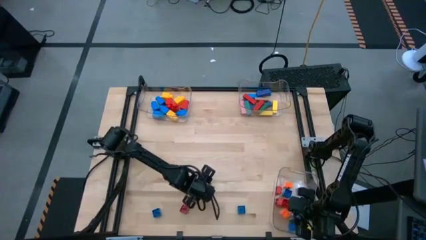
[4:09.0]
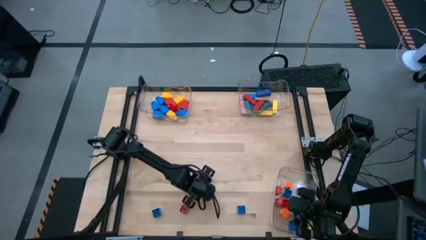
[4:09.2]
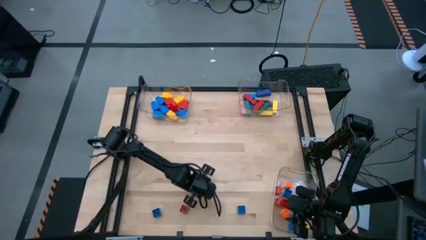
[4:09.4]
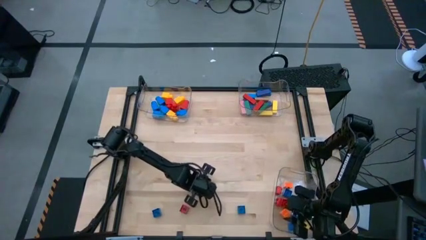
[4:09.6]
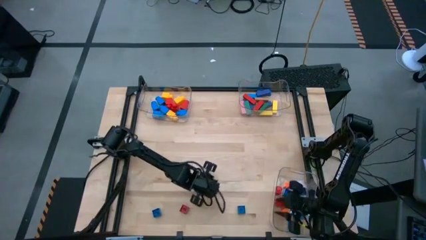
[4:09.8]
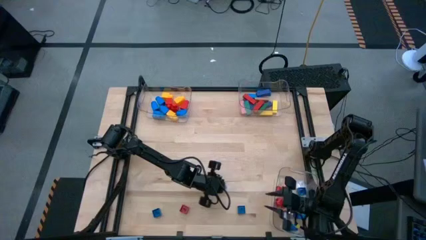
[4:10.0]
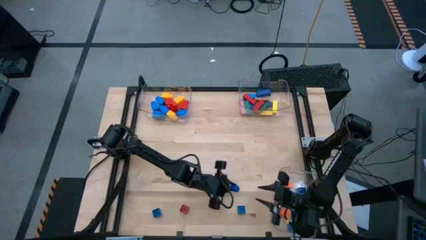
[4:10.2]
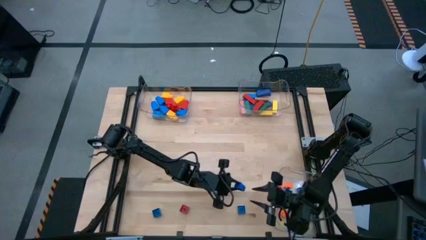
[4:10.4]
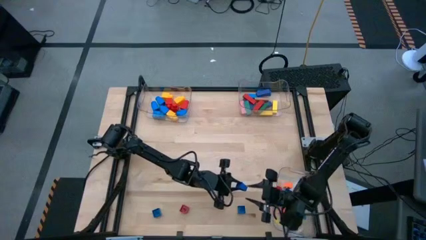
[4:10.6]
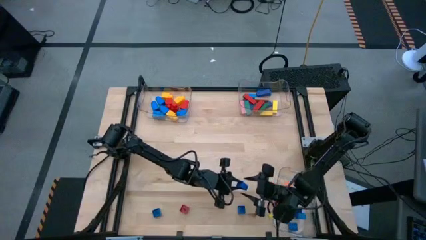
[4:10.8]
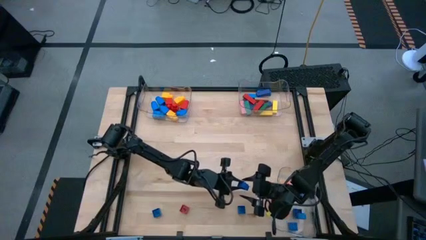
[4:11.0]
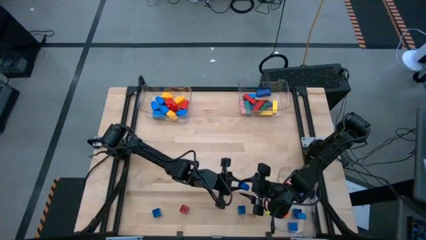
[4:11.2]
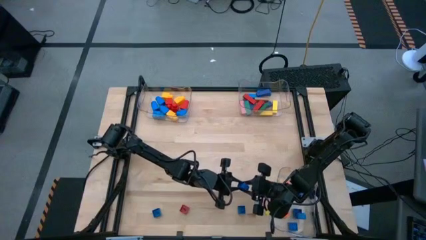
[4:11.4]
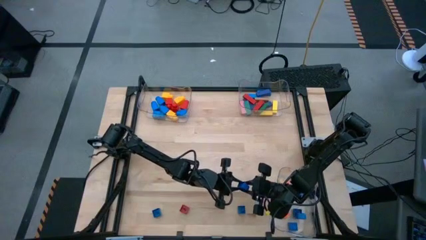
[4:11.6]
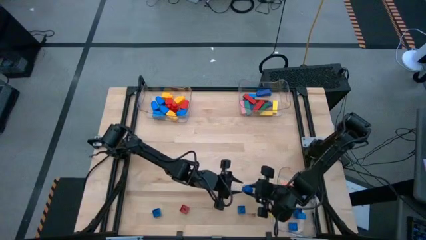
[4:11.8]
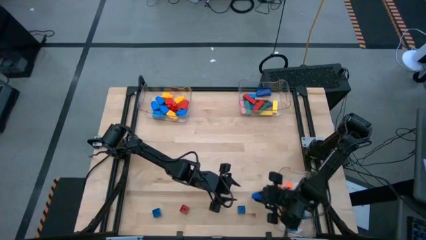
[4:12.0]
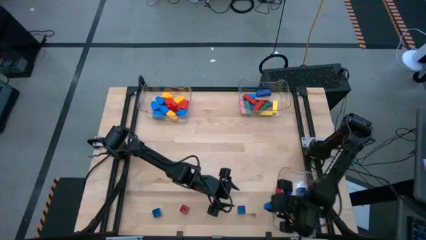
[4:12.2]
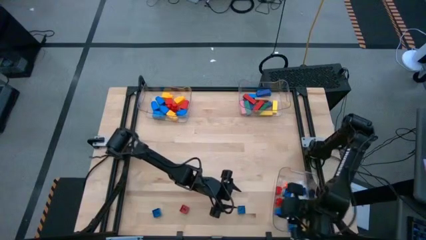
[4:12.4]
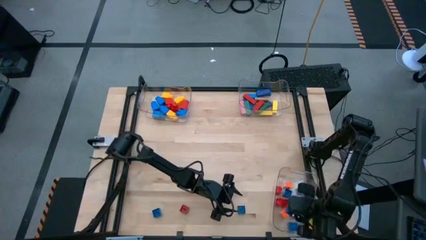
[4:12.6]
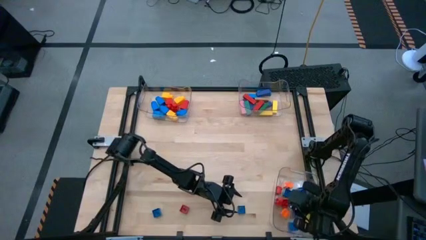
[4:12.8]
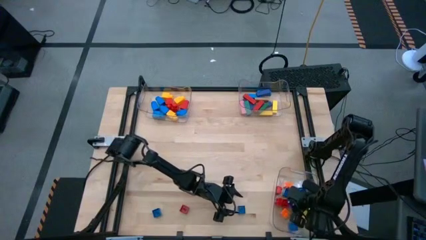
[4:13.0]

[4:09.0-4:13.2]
Task: Sort blocks by size
Put the 4 stud blue game piece into the bottom transparent bin

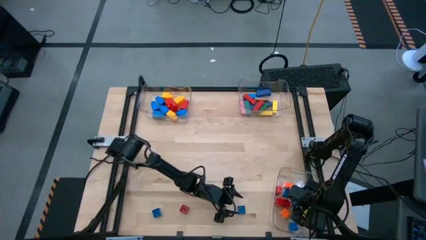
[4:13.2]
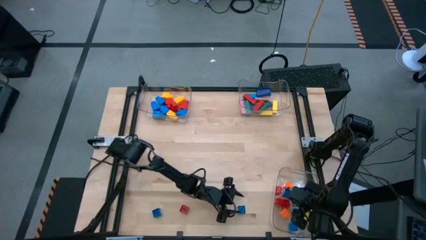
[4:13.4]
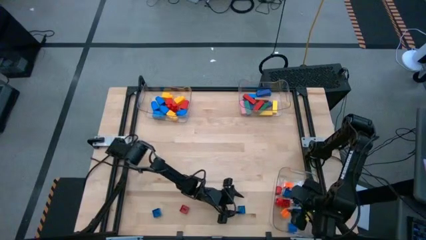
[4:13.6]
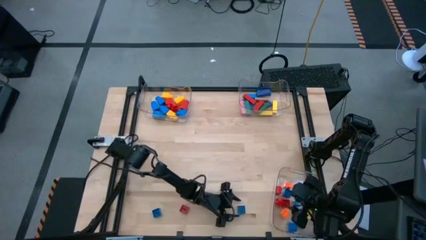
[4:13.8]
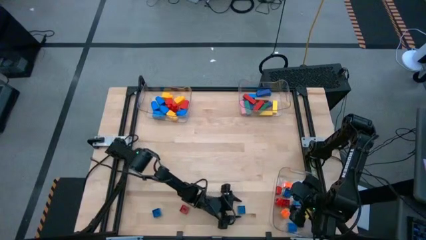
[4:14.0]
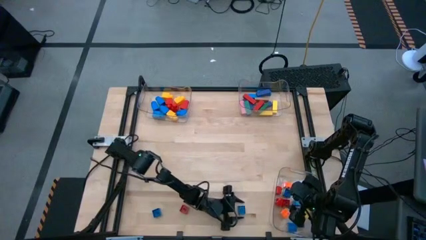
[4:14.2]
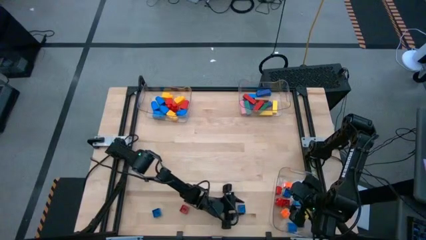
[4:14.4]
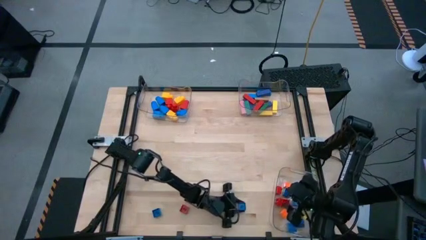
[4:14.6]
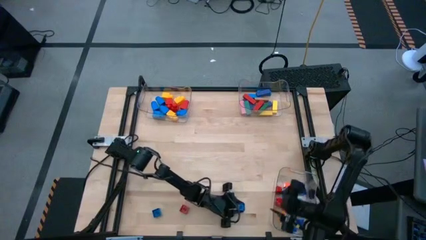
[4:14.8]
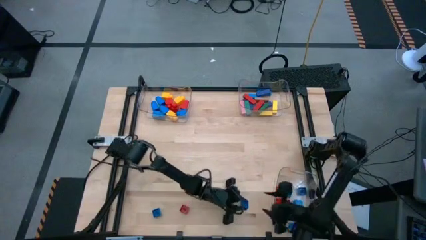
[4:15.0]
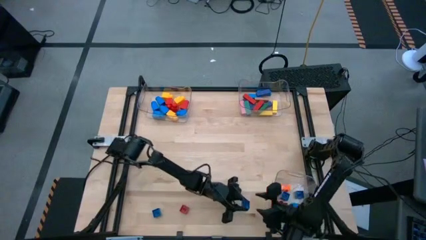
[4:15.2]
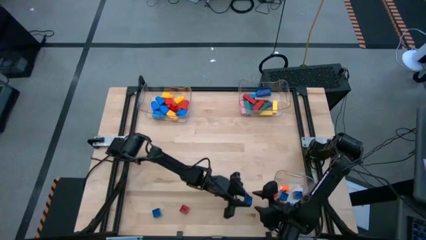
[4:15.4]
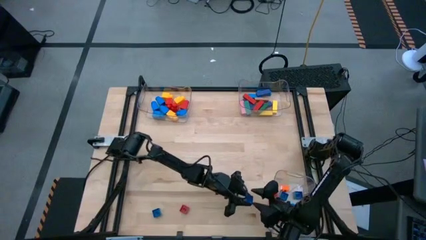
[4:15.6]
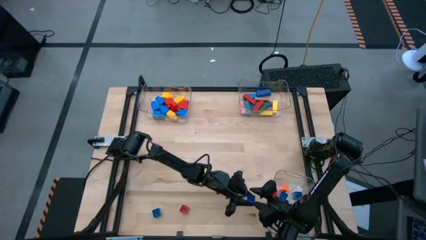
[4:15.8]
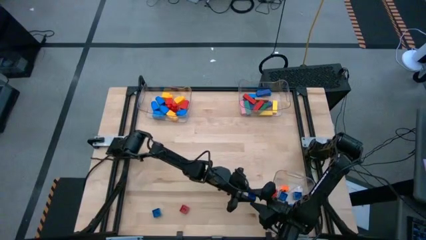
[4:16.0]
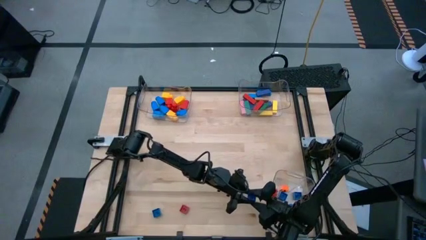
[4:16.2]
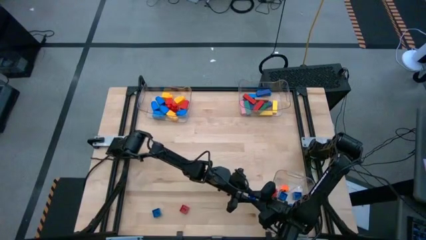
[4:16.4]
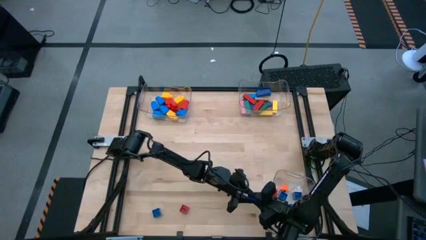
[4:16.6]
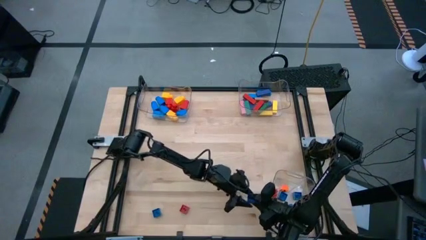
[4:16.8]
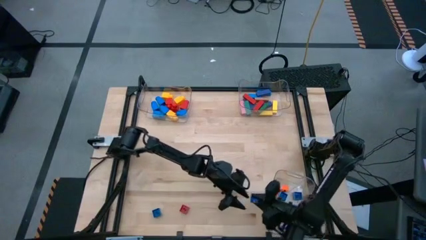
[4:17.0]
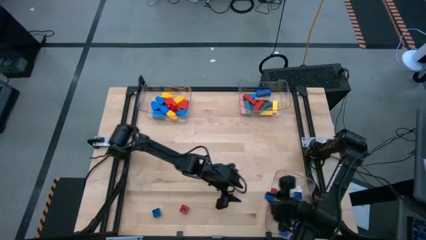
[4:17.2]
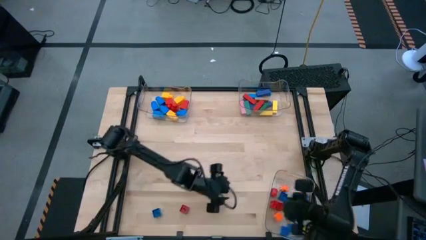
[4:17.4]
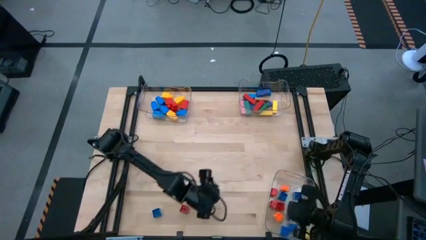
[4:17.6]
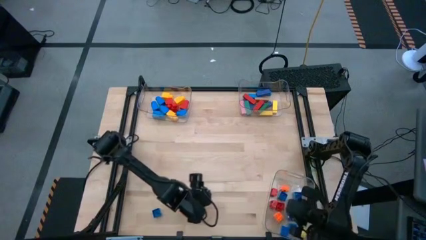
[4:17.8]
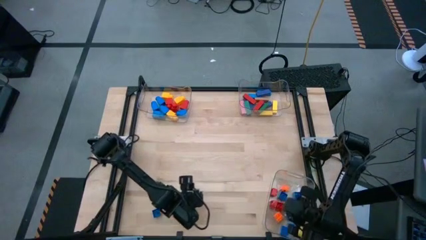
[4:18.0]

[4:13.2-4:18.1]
Put the 4 stud blue game piece into the bottom transparent bin

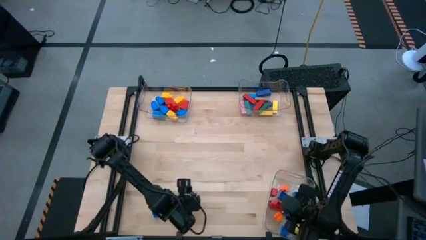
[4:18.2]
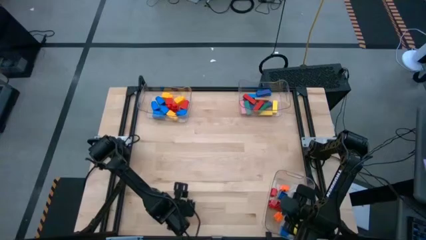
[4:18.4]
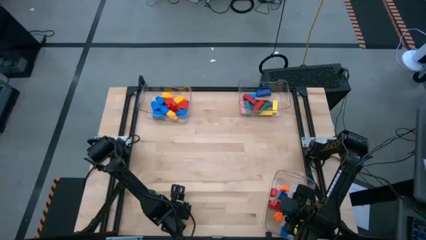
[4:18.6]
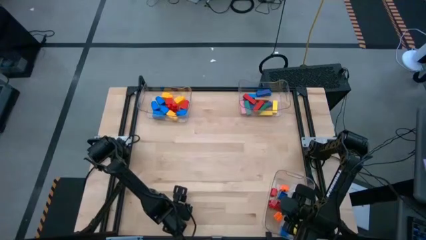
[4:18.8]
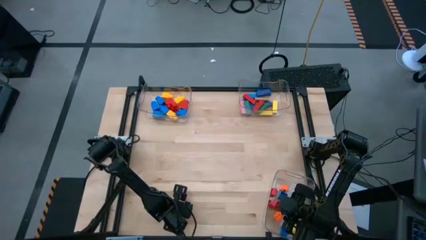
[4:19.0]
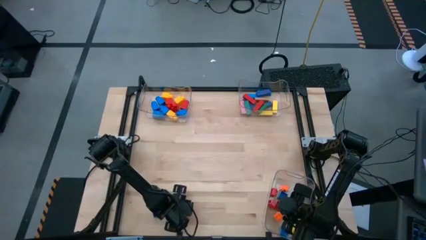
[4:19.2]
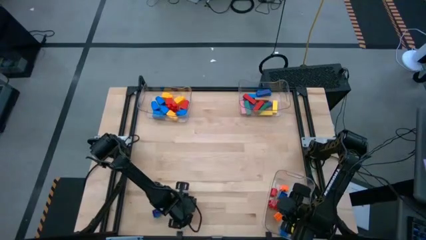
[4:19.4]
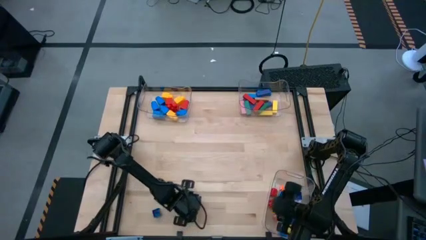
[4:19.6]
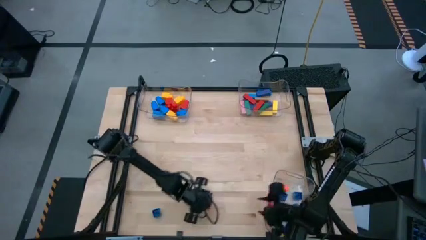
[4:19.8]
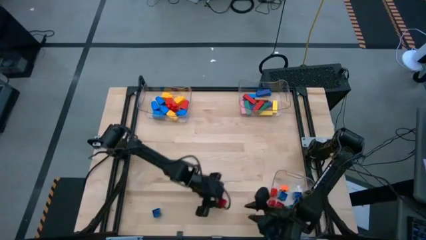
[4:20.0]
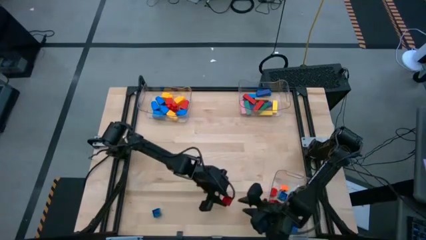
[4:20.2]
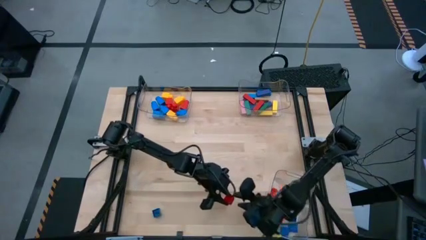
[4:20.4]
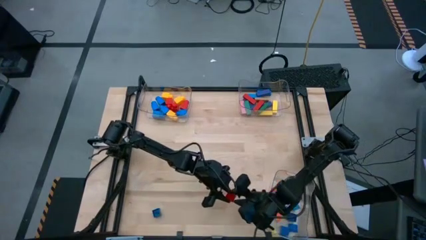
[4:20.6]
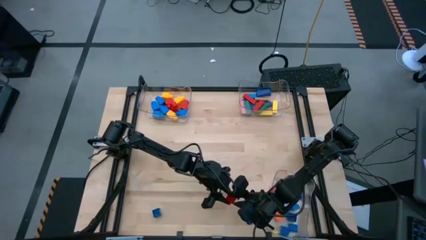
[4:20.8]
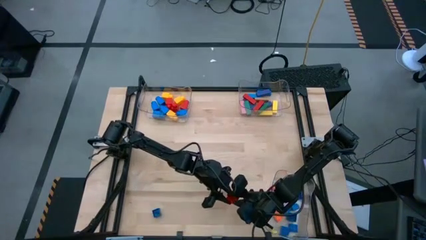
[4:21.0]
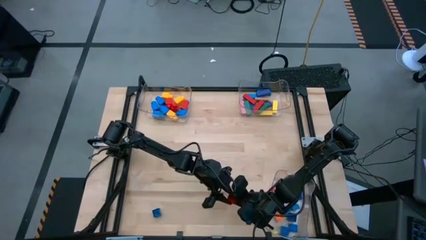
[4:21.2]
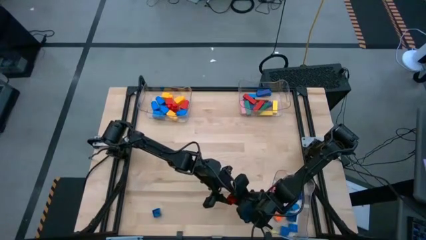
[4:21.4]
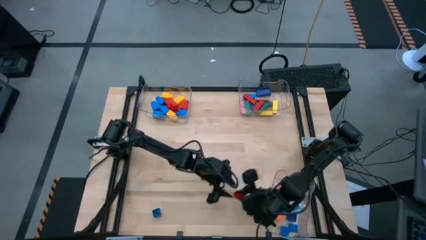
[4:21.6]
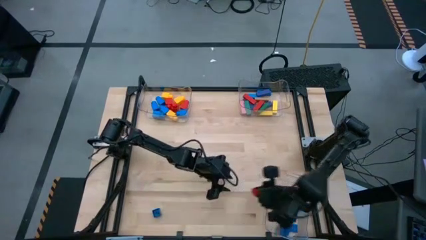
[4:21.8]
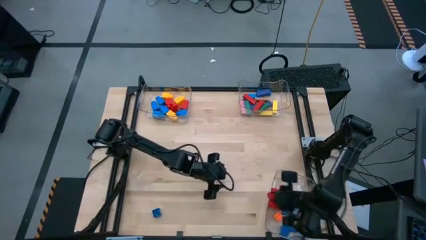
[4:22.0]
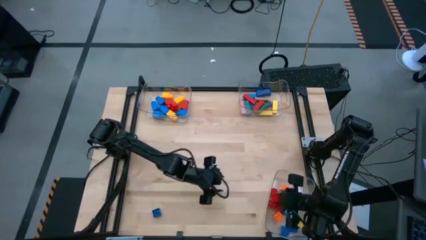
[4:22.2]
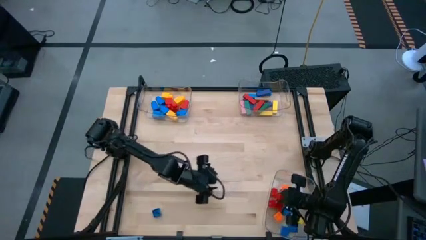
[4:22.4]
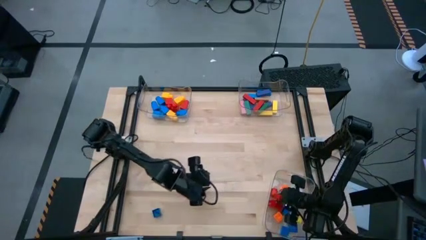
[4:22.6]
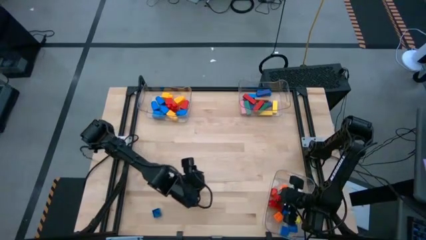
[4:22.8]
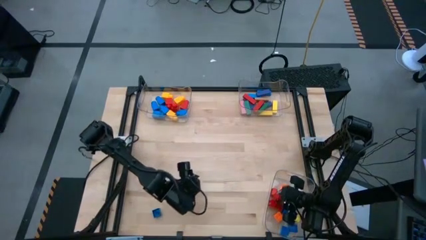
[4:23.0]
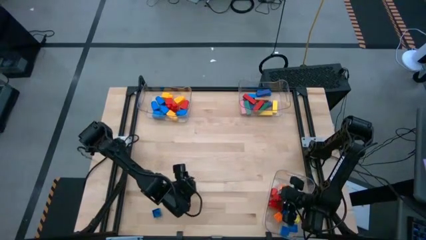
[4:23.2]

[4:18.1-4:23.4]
Put the 4 stud red game piece into the bottom transparent bin

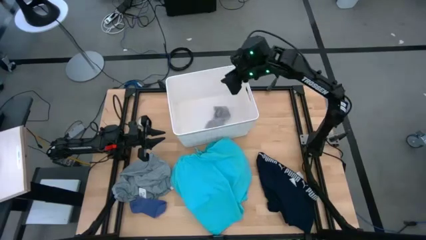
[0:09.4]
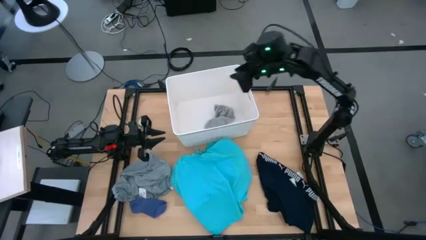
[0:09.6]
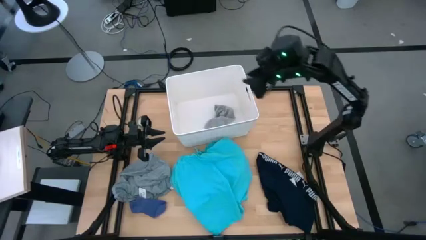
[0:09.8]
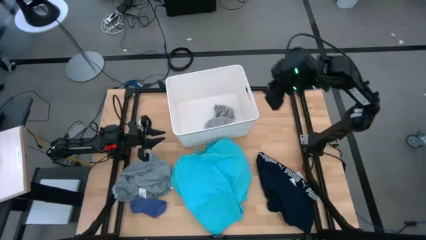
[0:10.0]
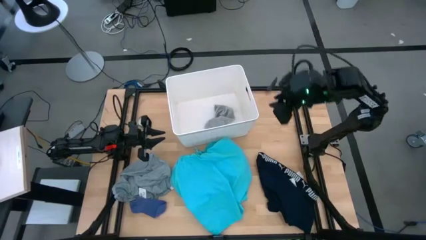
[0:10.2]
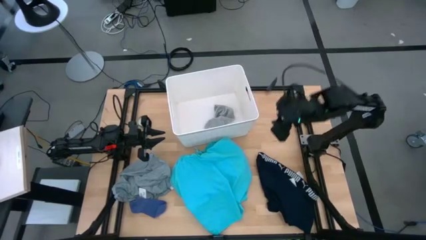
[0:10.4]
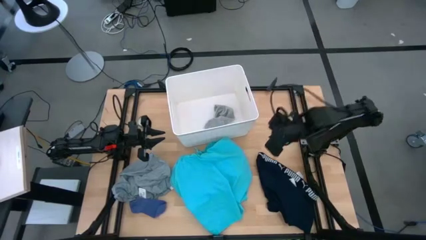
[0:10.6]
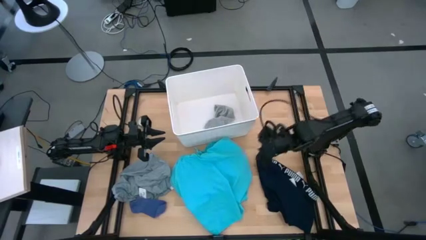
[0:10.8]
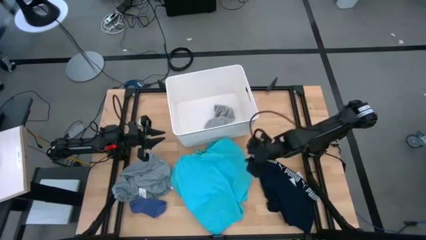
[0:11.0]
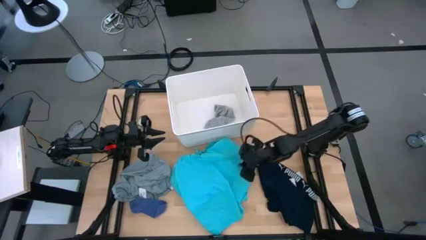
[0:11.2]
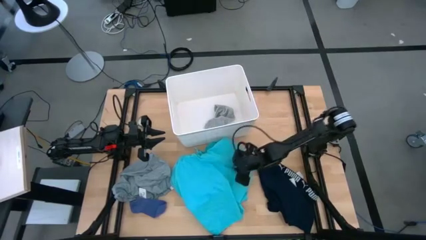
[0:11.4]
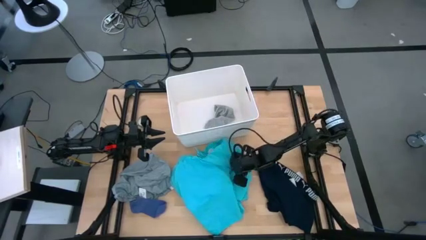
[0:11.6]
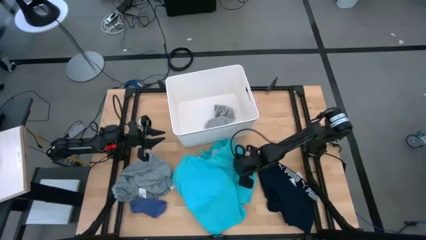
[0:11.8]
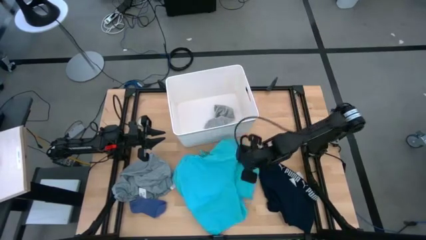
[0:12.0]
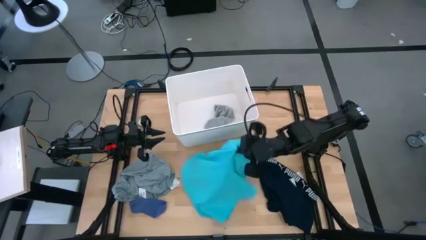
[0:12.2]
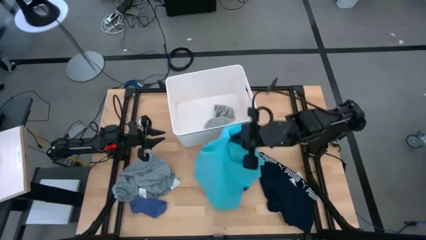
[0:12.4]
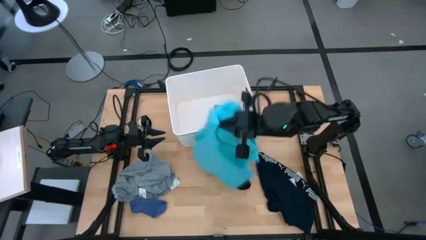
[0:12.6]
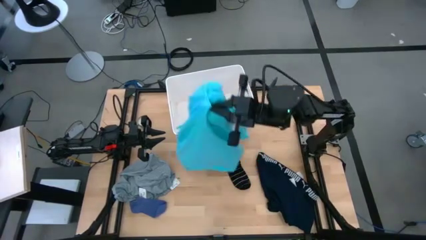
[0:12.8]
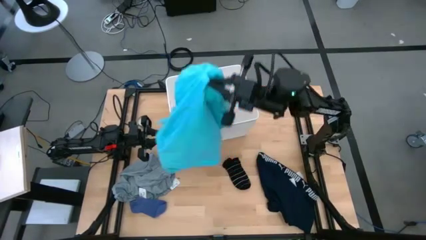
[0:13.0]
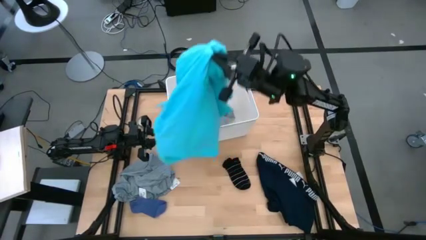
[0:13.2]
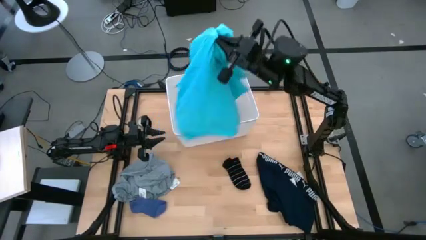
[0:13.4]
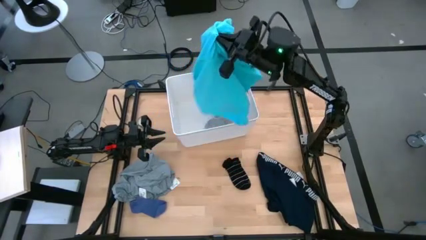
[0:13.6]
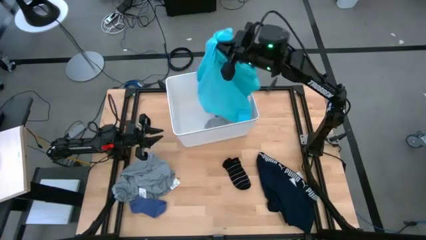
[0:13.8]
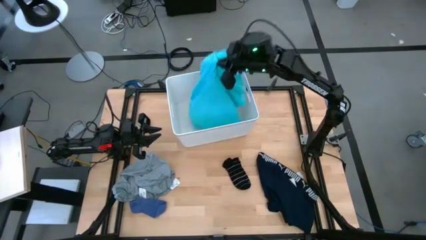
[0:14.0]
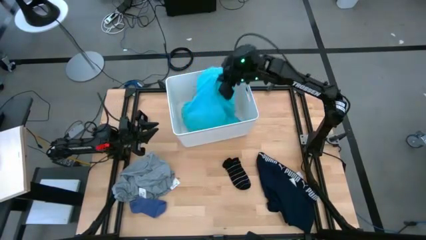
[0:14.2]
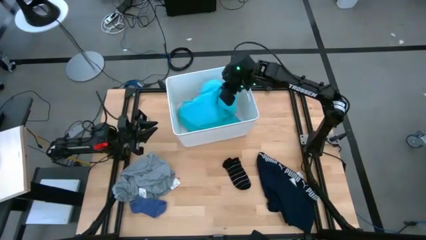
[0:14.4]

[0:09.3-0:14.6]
Task: Sort clothes
Put the light blue short into the white laundry bin
